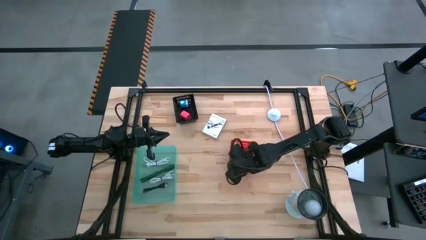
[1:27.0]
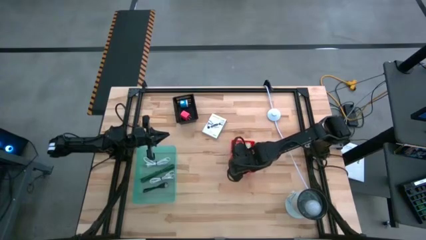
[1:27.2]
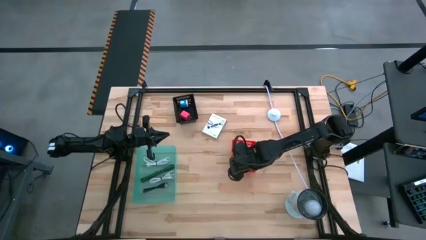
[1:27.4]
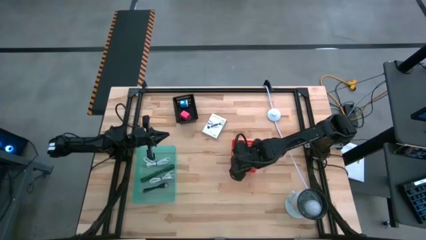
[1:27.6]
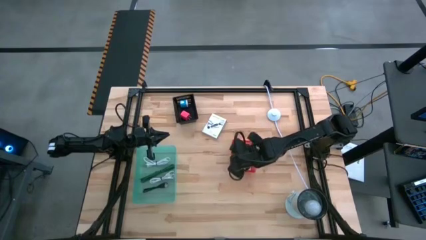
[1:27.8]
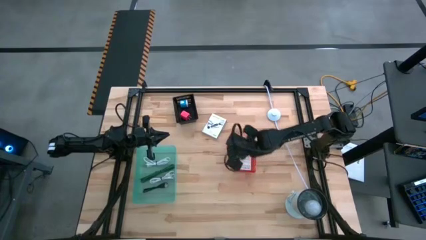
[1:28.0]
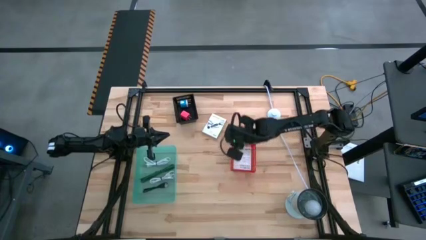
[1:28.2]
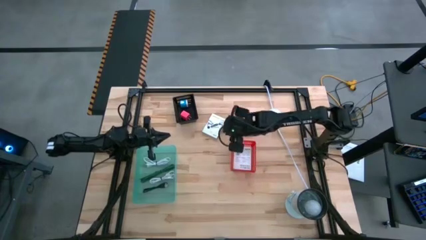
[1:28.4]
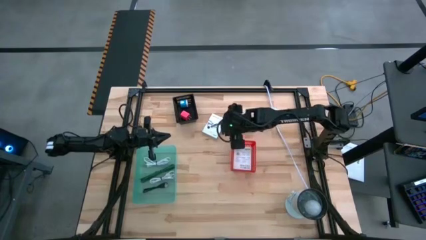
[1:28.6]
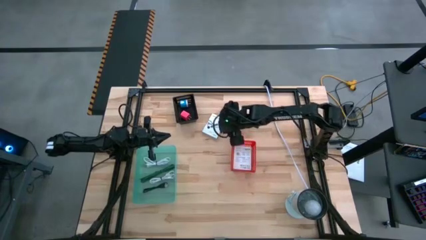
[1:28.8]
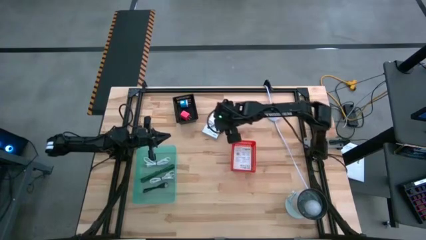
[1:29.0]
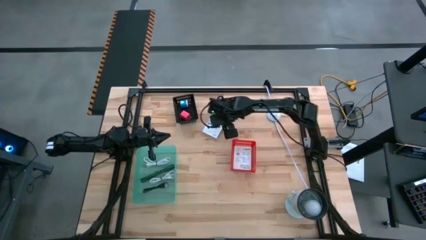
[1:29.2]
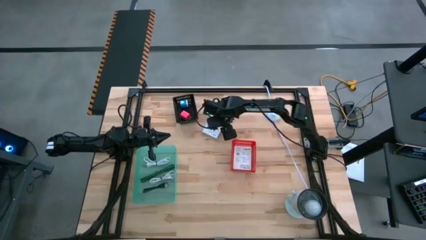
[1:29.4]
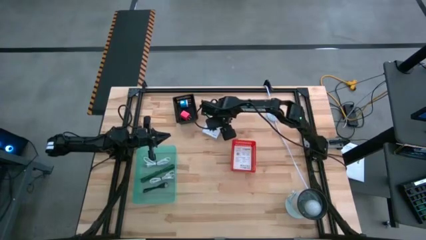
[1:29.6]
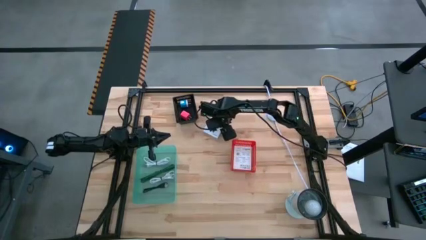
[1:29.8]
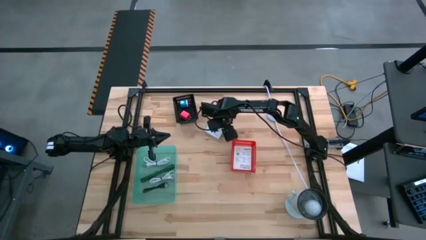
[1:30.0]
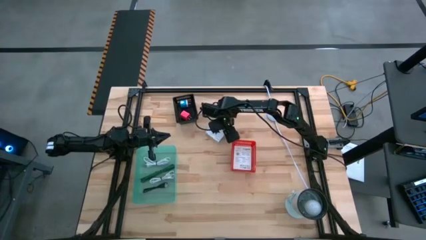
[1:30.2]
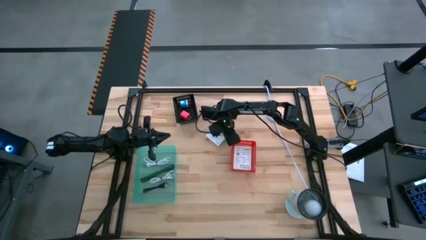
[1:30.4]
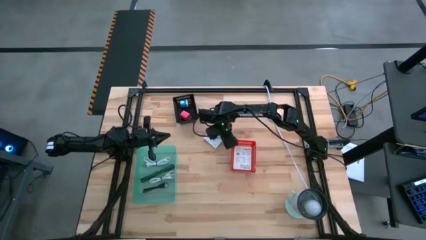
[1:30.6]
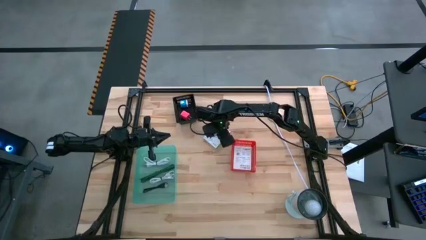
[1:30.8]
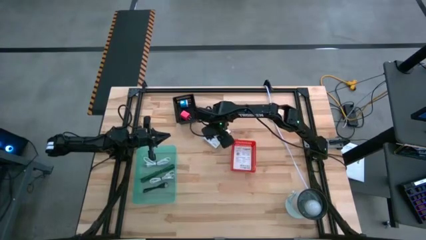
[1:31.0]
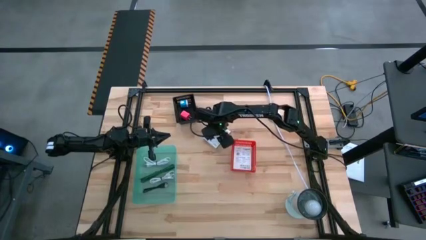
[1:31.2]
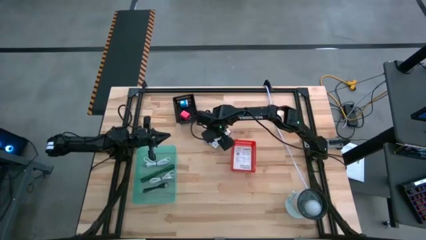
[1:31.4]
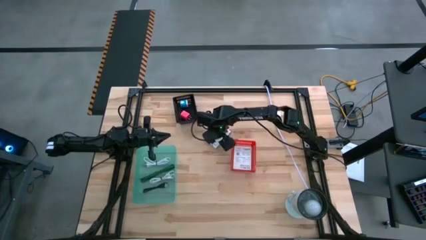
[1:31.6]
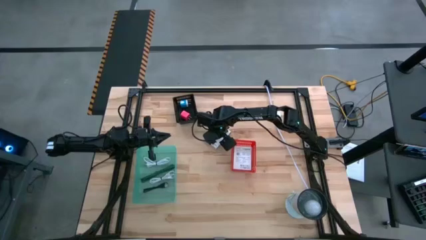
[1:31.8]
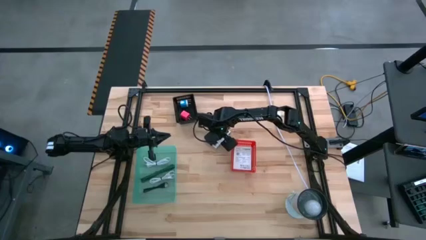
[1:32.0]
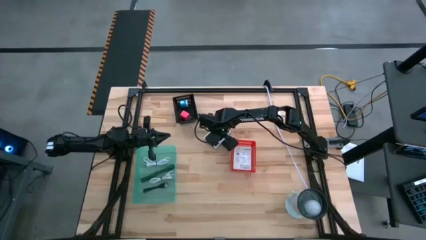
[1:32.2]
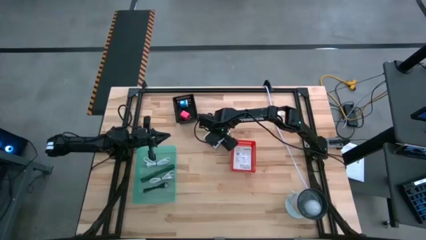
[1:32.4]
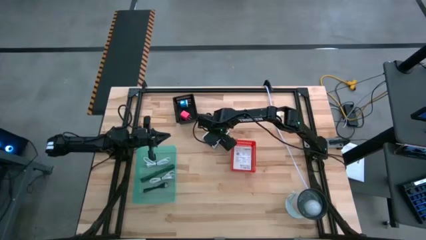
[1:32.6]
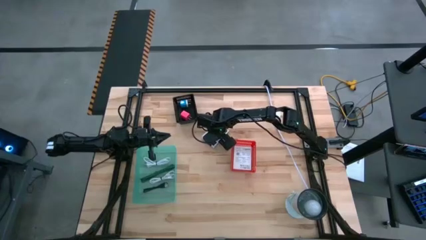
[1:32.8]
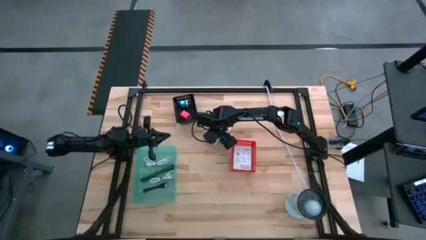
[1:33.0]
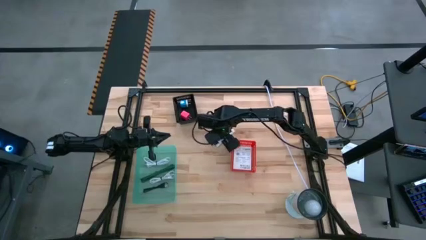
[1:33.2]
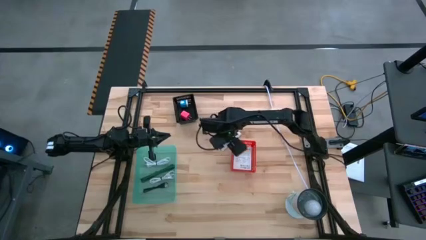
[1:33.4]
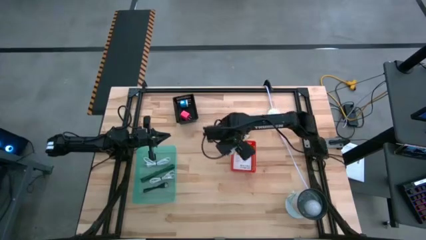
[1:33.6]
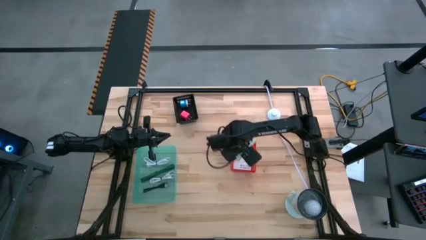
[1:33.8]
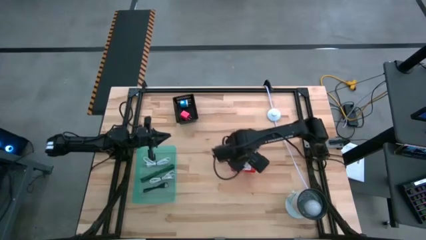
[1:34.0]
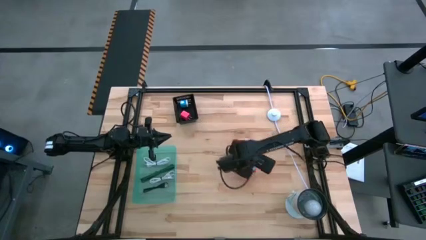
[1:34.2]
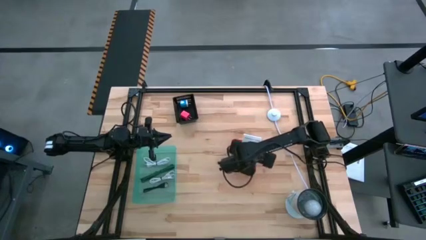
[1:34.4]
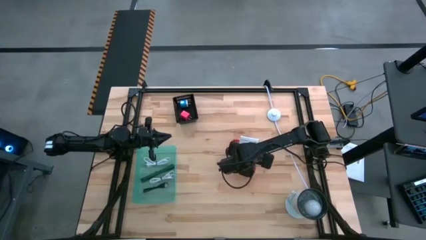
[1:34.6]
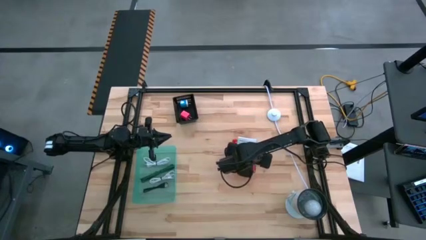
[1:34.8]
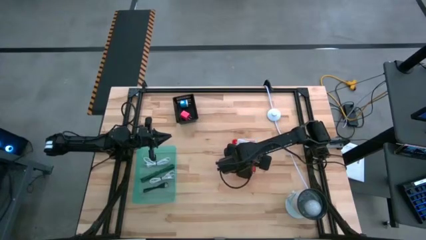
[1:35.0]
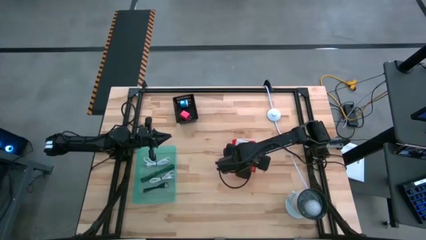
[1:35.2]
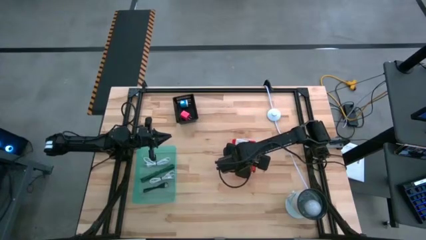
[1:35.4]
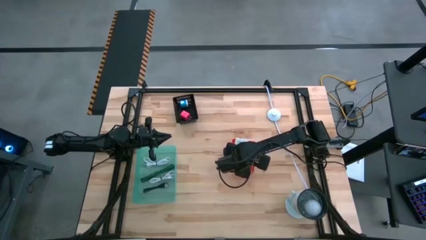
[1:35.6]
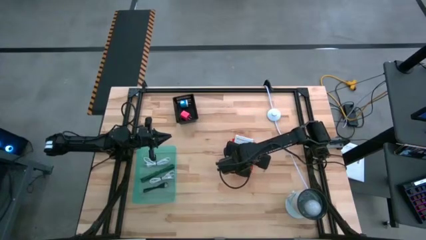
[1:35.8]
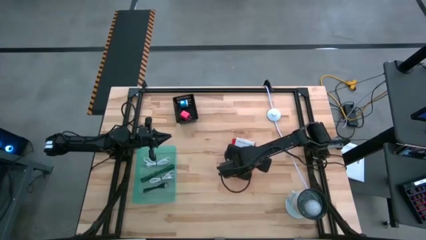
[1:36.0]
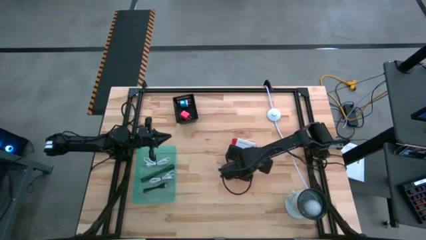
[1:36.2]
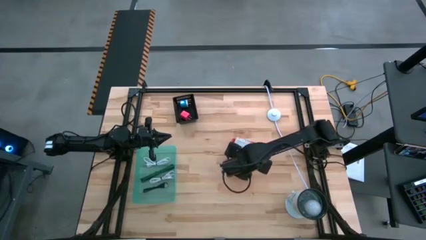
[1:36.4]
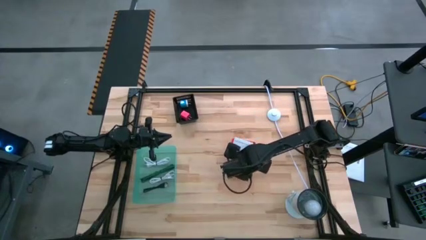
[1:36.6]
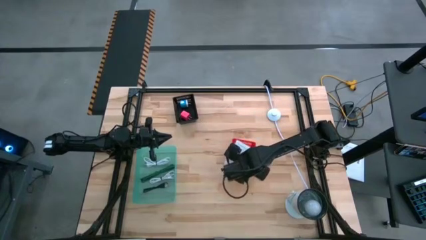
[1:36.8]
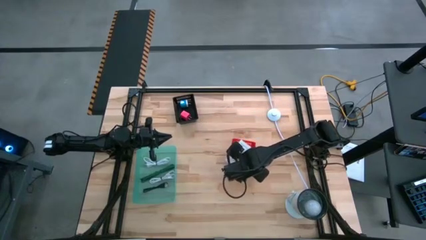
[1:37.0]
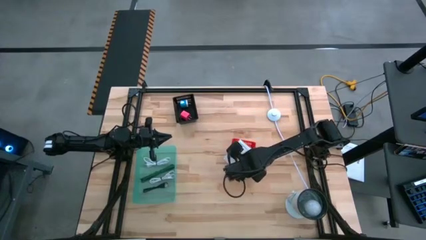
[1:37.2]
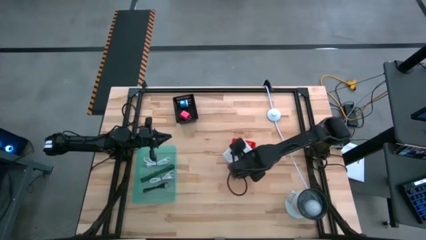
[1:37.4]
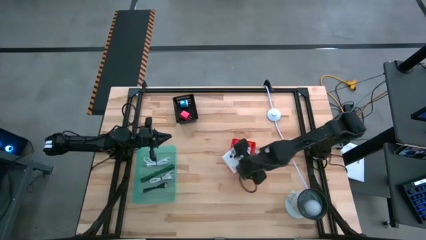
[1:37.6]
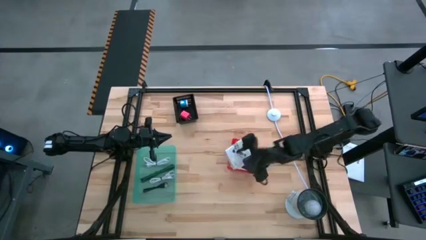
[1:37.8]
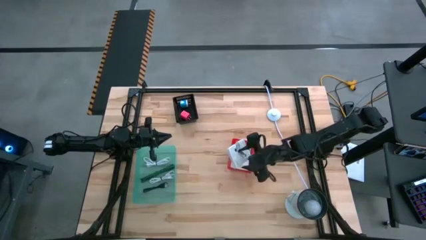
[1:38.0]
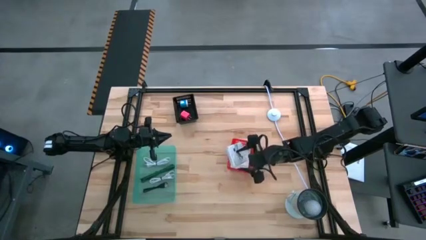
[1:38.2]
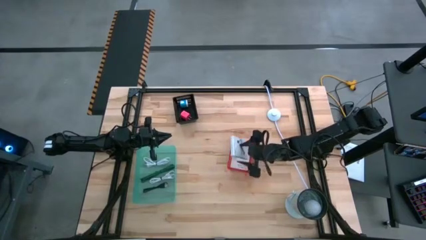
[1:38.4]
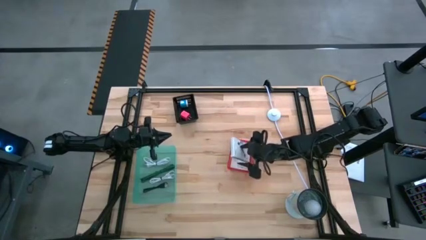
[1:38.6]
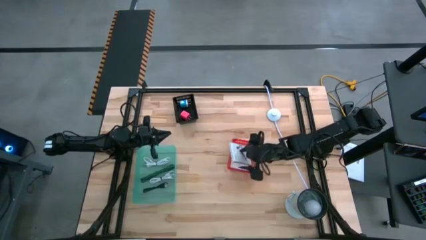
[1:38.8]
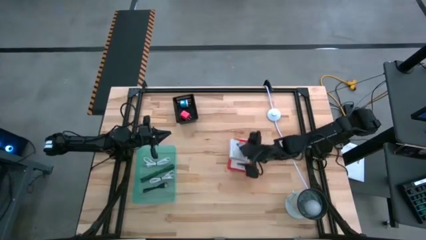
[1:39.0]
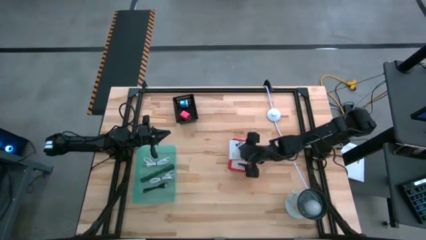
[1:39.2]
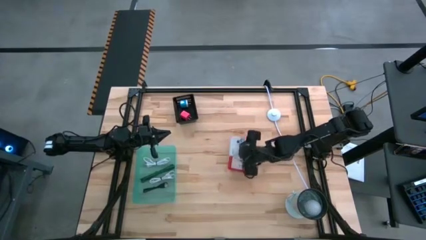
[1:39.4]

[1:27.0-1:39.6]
Task: Pick and place items into bin
Put the white USB box into the orange bin

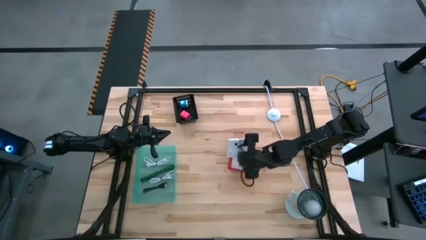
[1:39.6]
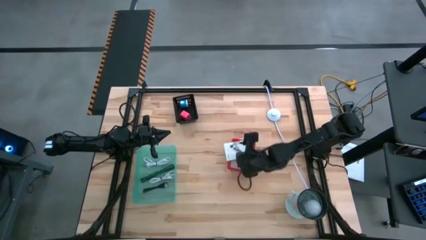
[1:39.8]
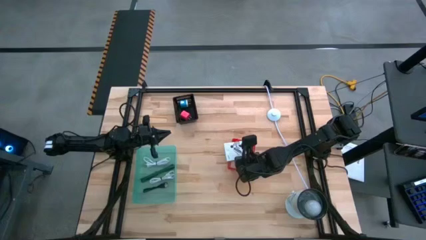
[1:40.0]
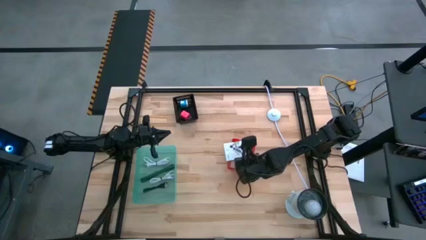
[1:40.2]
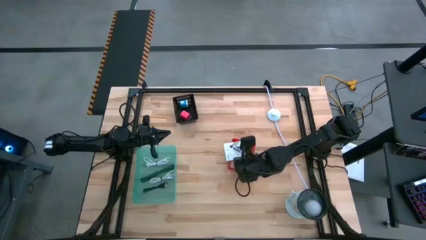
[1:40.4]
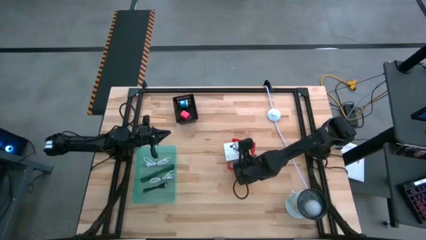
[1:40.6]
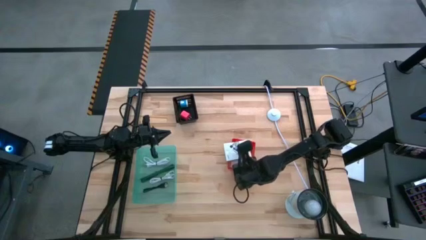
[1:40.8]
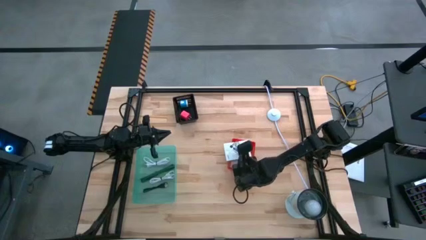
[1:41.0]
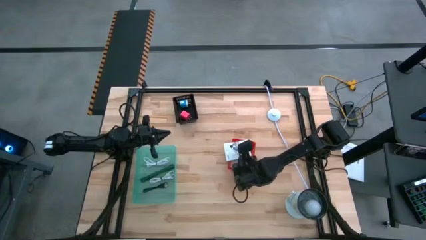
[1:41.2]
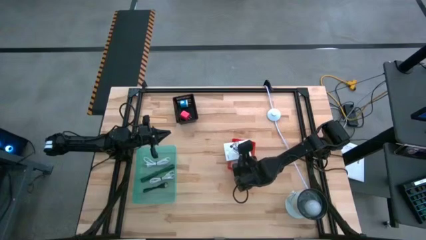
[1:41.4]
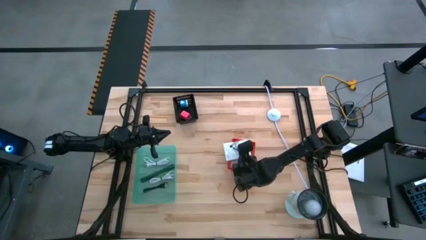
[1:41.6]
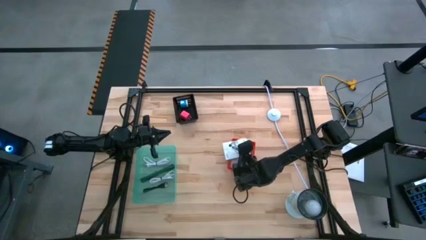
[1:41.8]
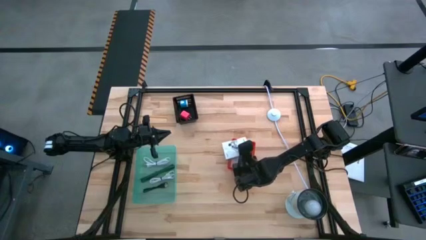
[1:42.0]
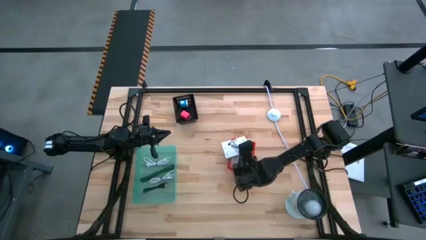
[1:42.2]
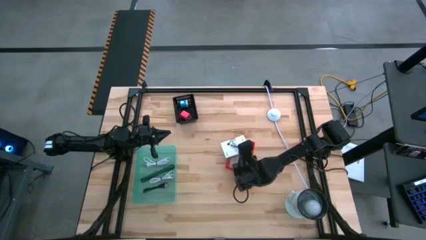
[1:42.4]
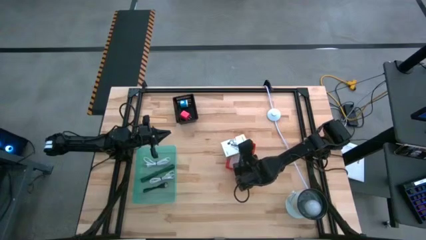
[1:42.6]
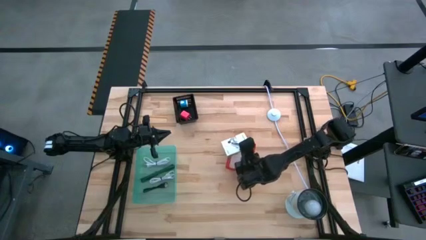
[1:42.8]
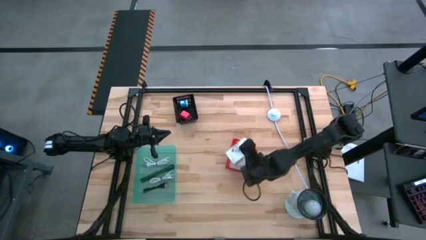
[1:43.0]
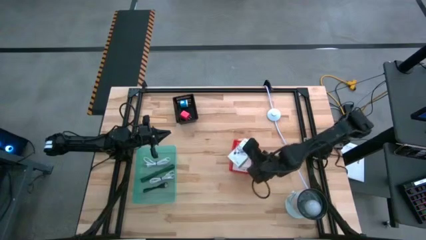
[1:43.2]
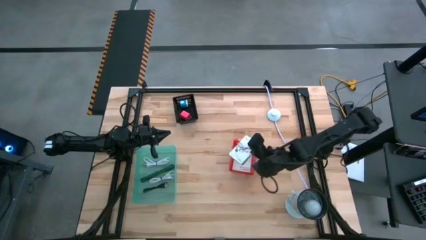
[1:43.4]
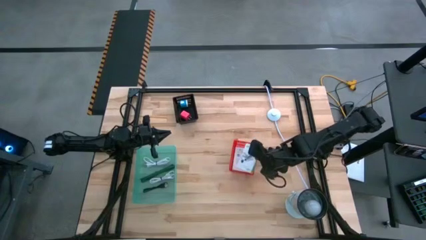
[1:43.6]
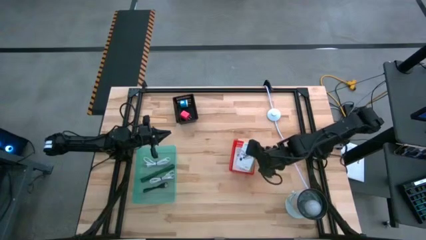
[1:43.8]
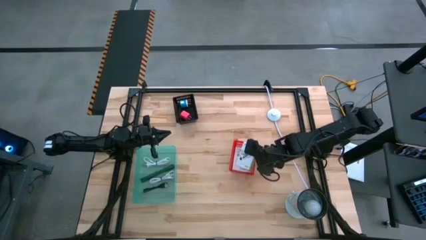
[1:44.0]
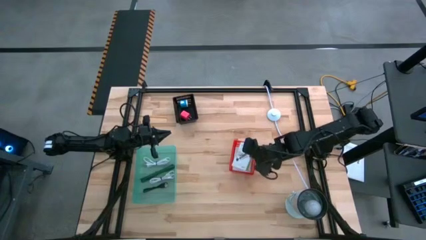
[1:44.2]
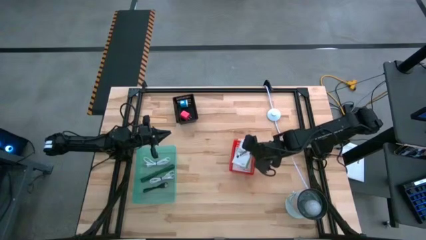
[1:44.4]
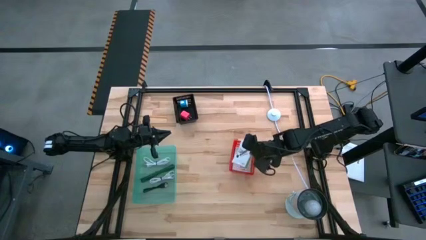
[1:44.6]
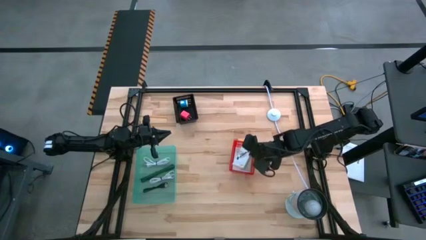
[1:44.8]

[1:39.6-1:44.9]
Put the white USB box into the orange bin
